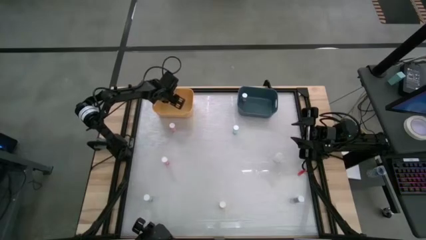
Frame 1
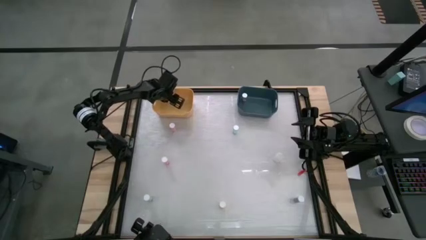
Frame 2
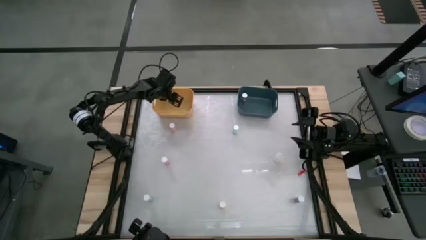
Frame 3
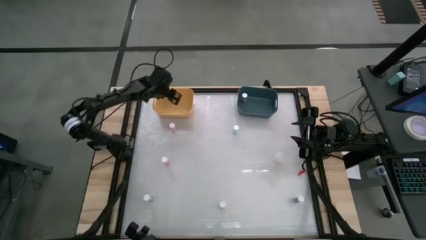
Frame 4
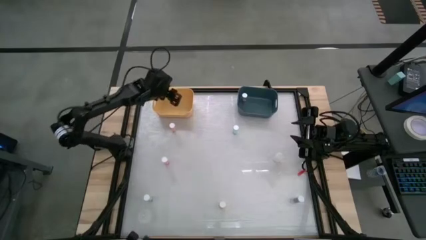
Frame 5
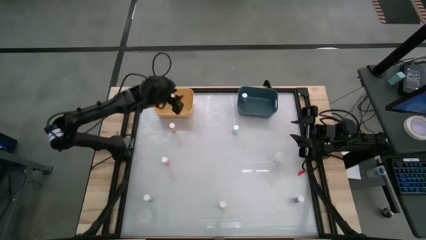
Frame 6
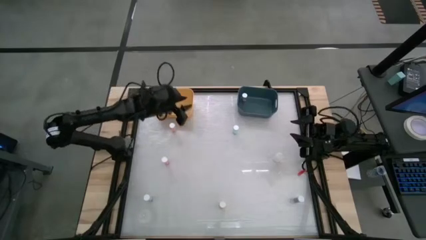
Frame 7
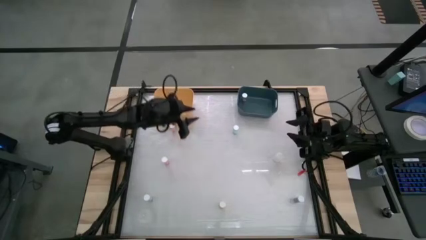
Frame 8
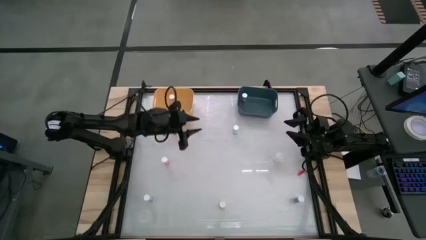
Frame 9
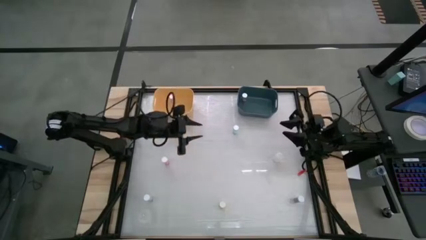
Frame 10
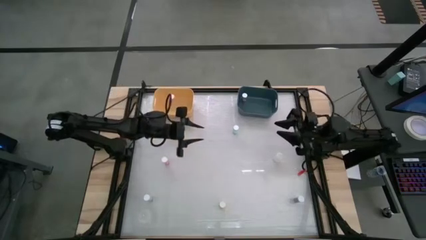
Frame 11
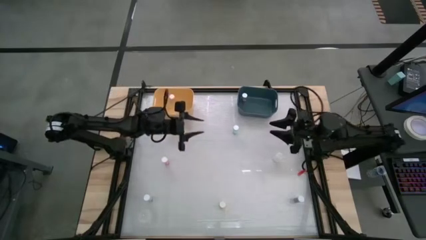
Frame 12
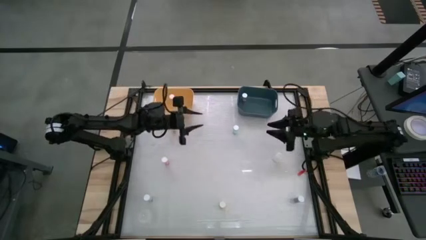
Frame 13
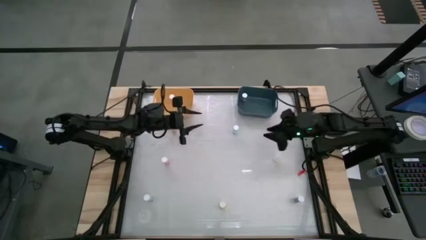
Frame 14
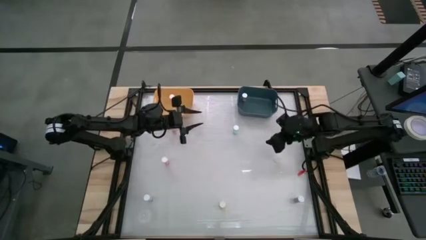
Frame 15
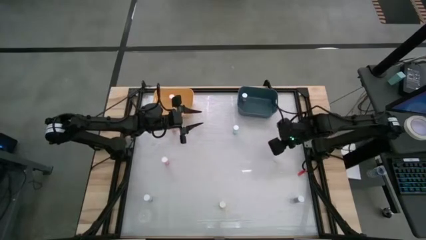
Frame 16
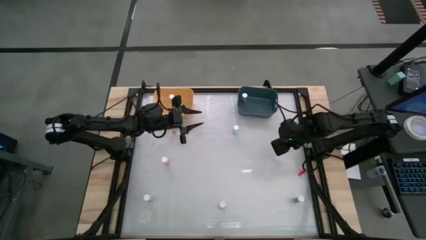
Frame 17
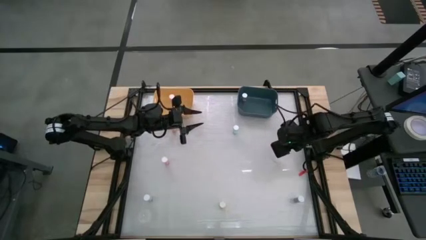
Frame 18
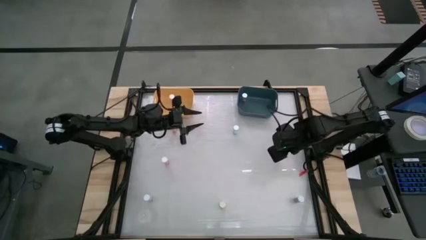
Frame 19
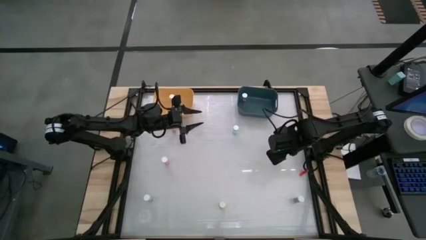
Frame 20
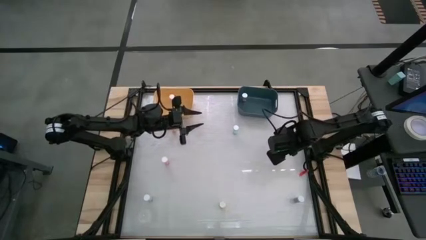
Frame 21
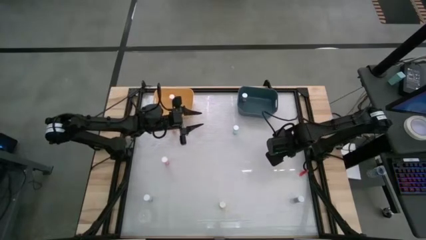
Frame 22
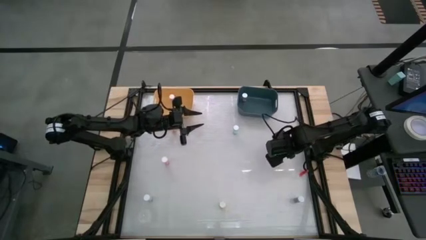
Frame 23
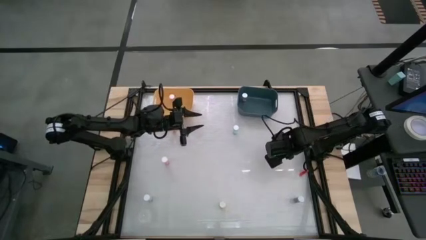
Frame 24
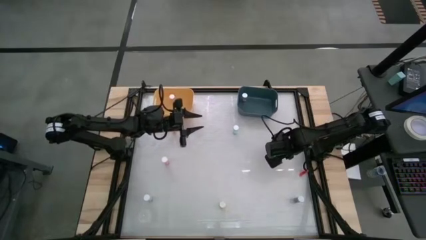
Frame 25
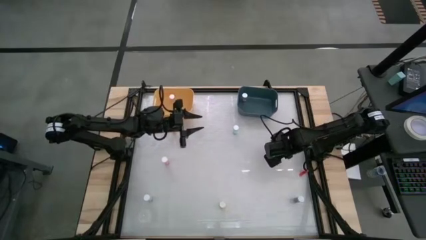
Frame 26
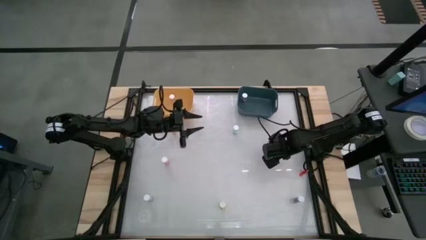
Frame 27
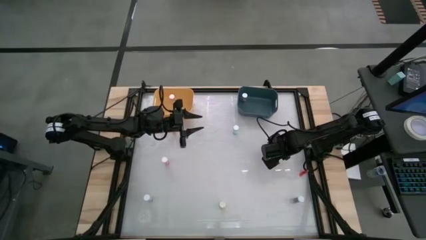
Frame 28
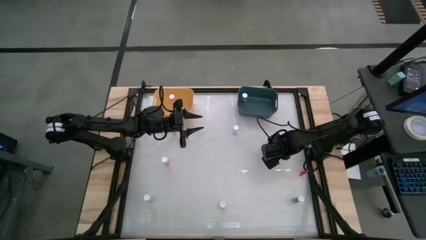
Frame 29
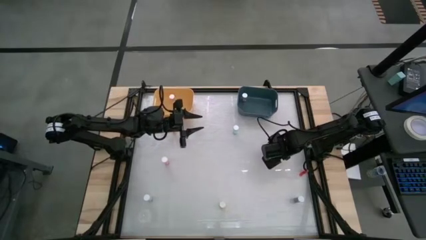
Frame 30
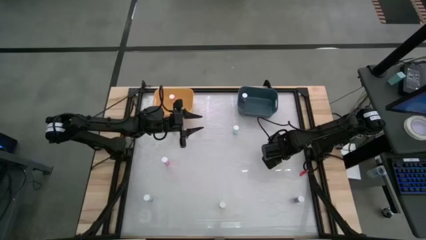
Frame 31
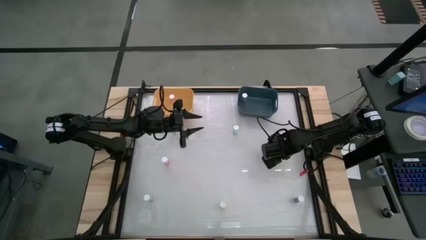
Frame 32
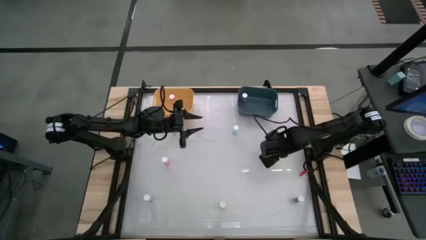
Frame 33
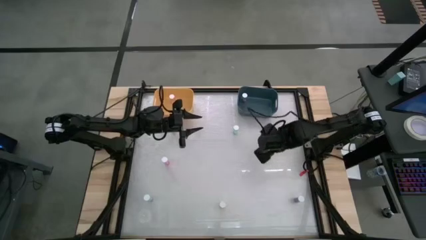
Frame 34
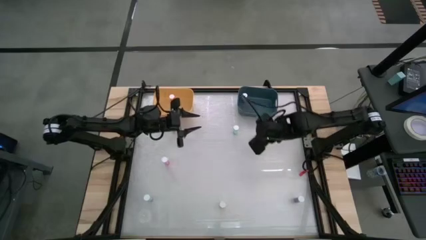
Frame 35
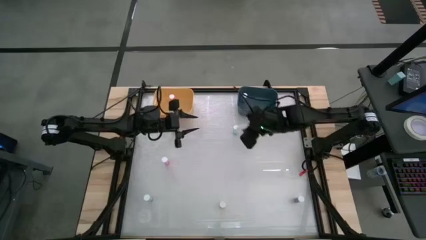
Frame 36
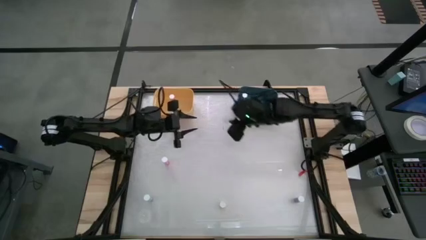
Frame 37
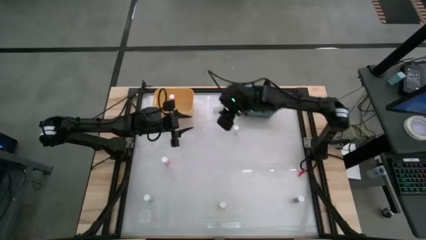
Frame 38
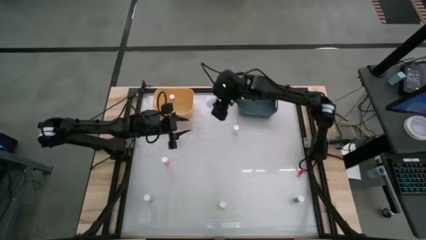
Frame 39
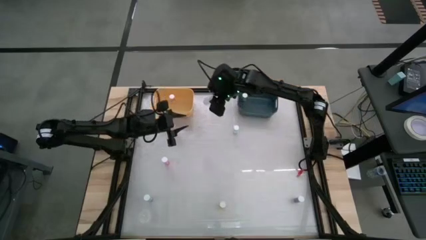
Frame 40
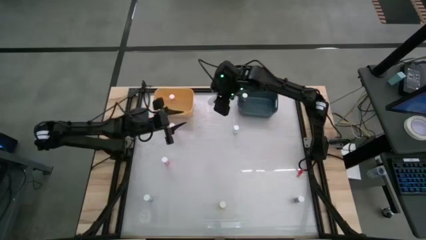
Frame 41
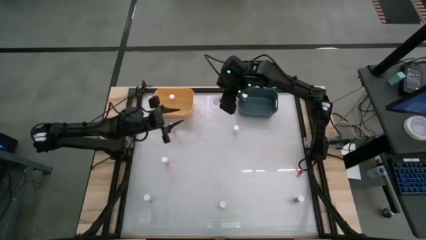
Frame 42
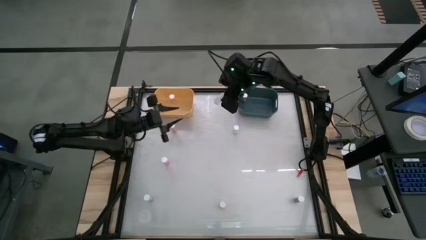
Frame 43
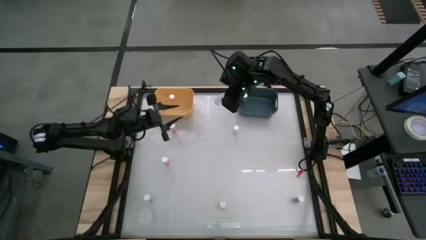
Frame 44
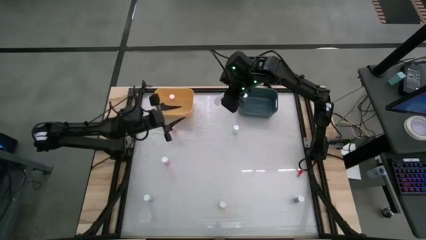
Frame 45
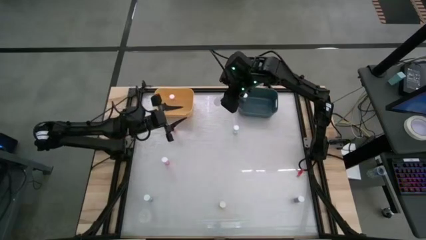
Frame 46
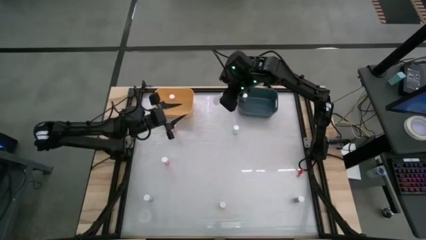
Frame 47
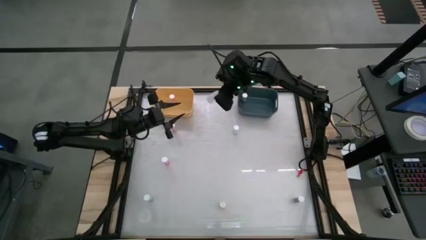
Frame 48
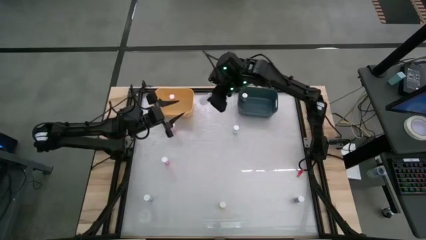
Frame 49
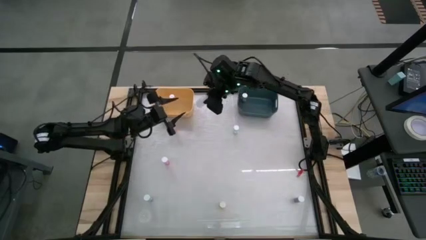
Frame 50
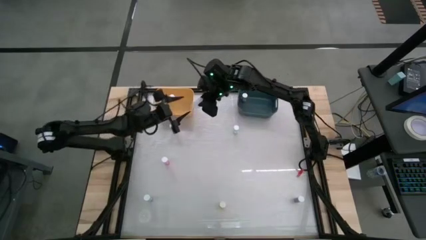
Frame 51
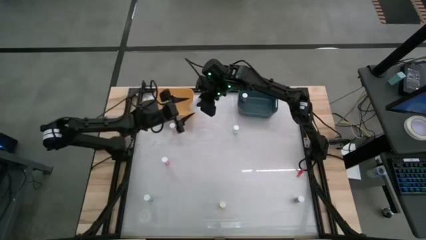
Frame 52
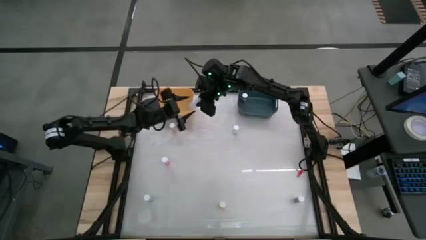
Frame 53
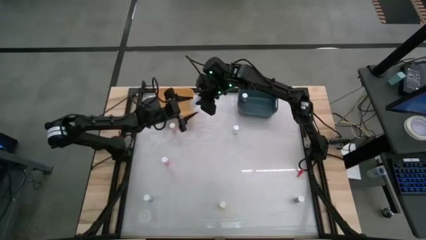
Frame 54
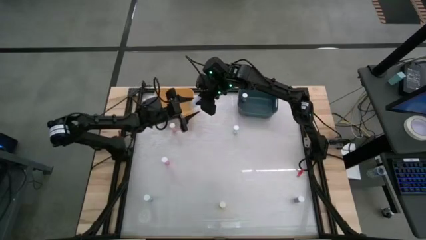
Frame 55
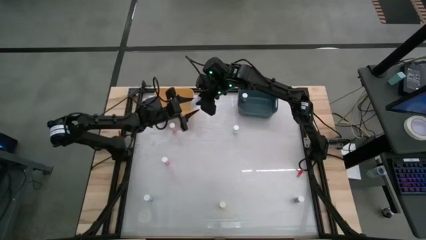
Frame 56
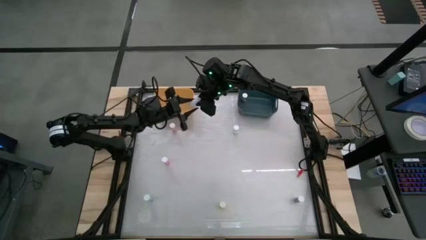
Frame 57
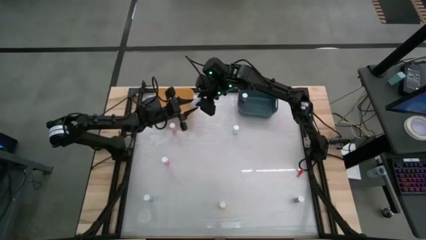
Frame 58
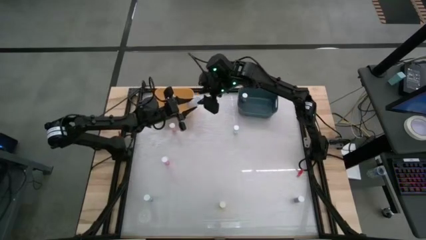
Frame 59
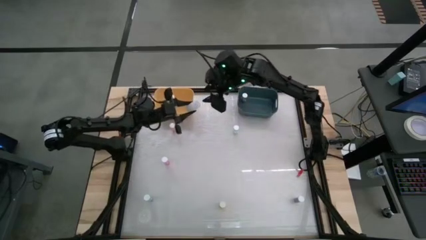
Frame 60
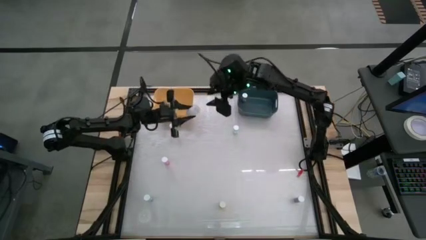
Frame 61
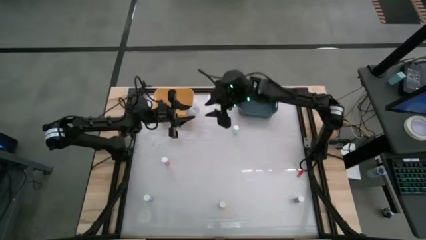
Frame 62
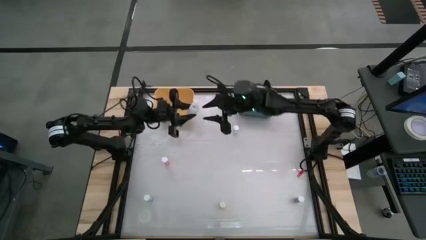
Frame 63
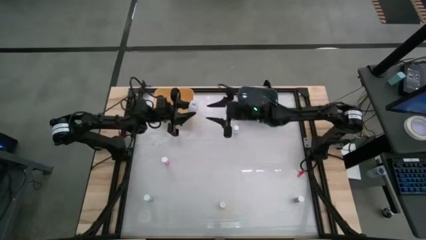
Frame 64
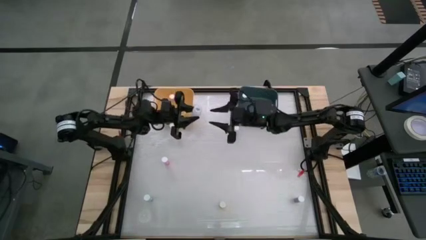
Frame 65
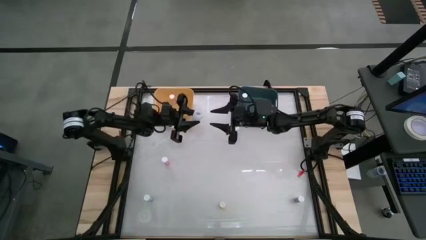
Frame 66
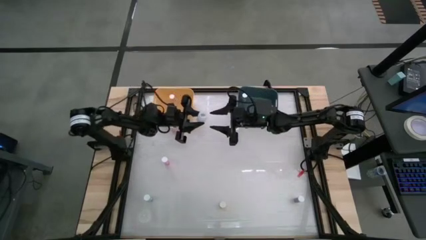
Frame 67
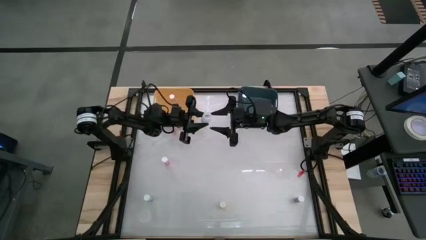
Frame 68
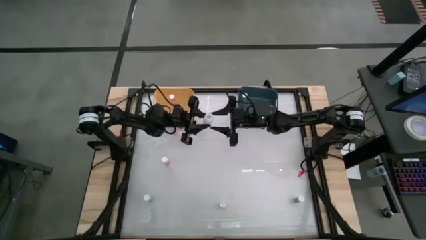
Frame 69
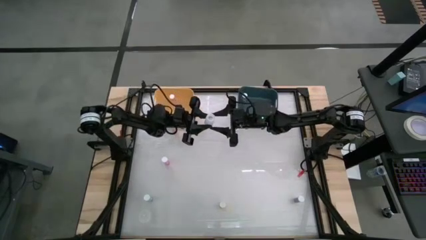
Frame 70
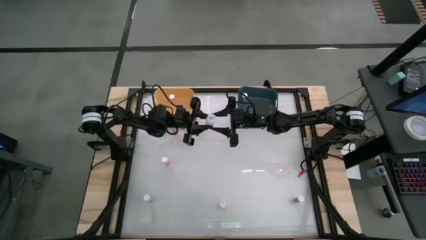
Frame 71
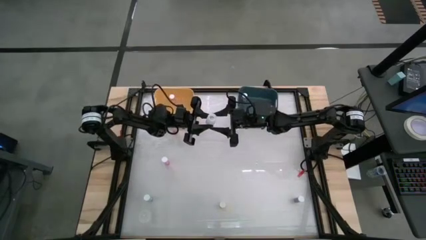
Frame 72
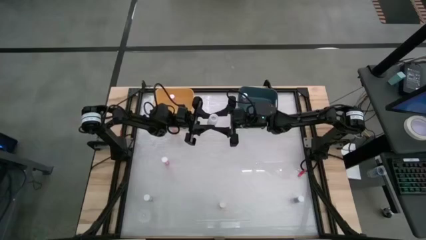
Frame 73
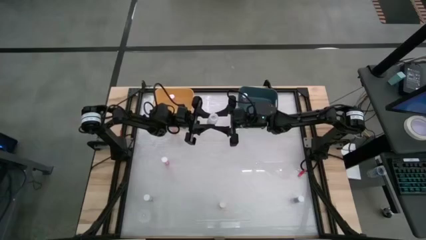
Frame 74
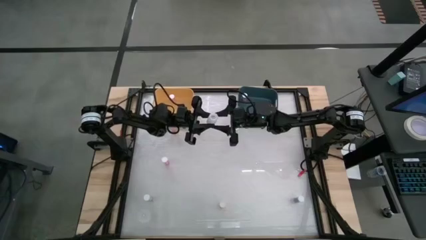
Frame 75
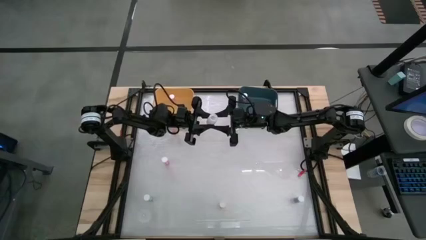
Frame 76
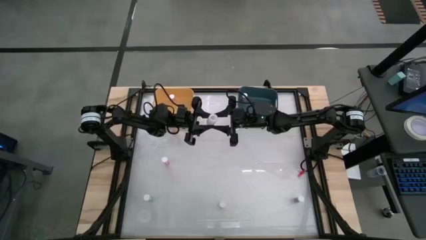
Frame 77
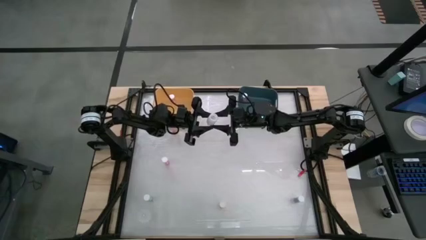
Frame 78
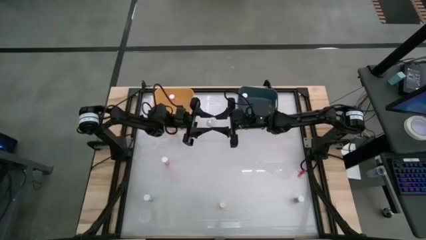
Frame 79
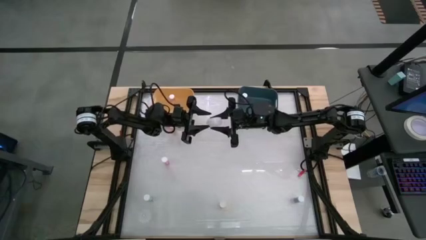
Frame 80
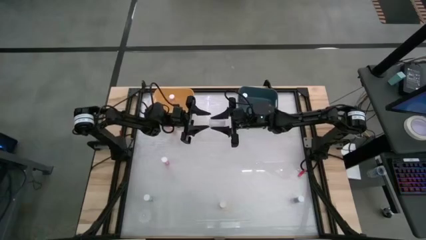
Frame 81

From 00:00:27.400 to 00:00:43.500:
Task: Pick and place medicine bottles into bin by pill shape (circle, oval)
Put the transparent tablet bottle into the yellow bin

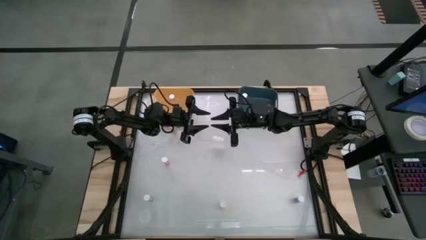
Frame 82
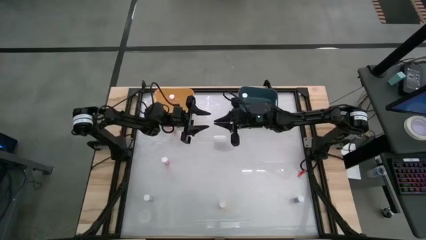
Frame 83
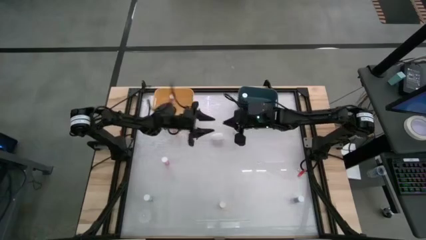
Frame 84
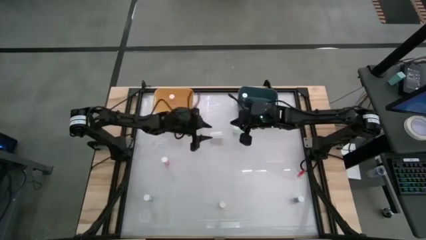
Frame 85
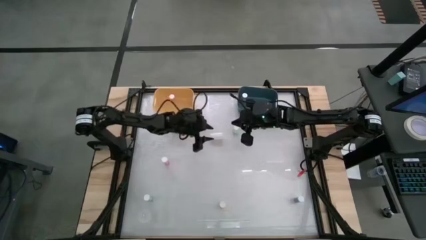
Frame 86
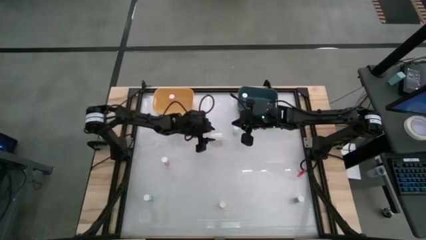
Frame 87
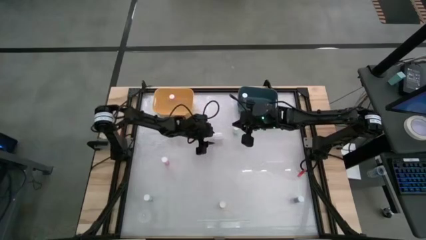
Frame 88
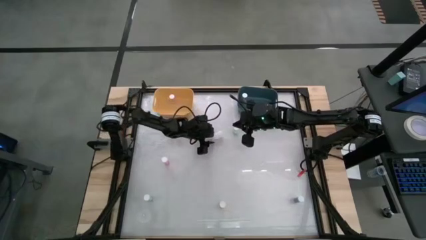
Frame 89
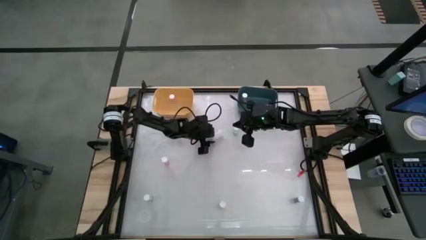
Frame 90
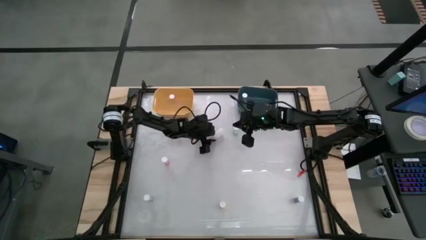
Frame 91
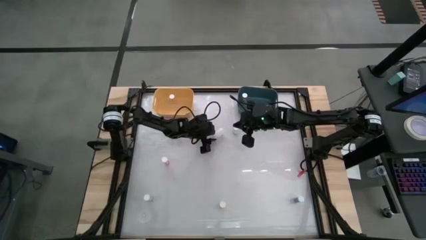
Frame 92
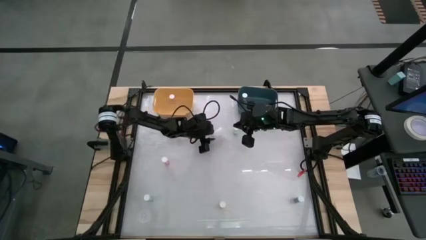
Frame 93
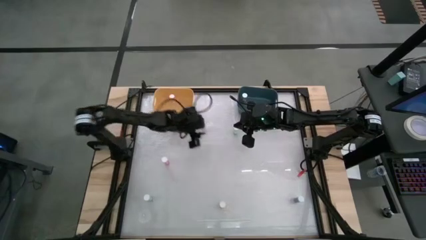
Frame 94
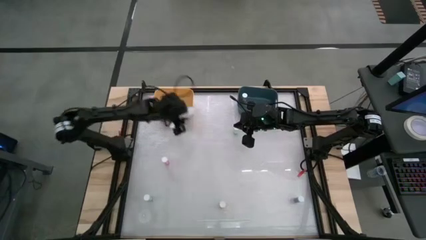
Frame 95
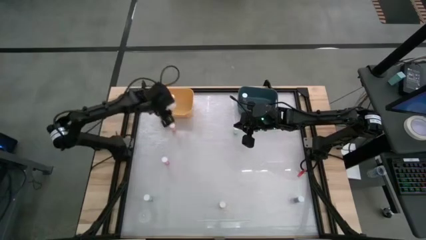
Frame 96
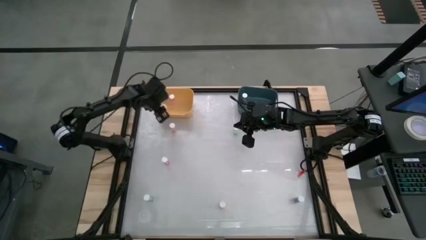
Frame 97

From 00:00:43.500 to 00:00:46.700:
Put the transparent tablet bottle into the yellow bin
